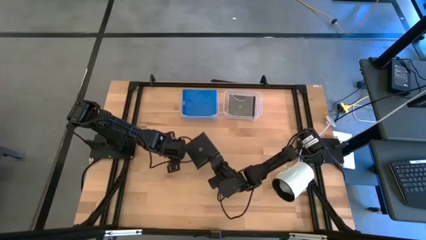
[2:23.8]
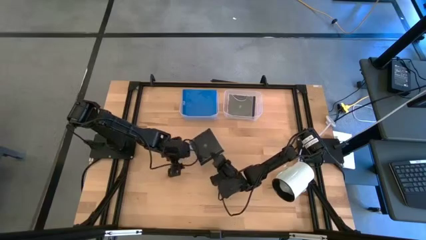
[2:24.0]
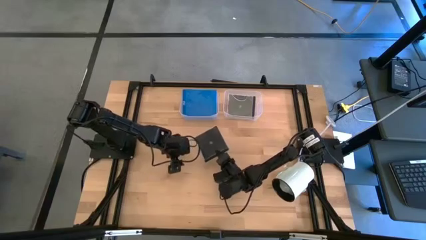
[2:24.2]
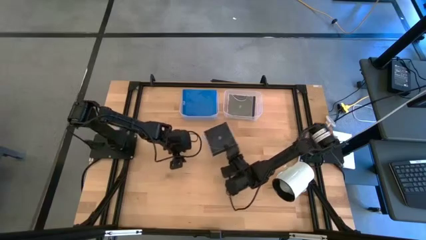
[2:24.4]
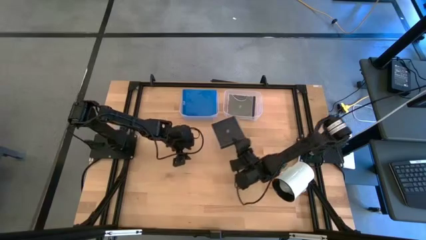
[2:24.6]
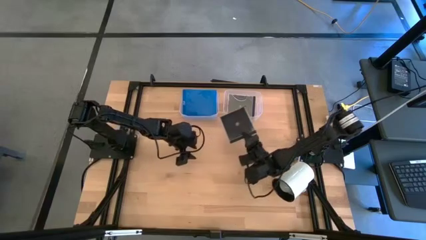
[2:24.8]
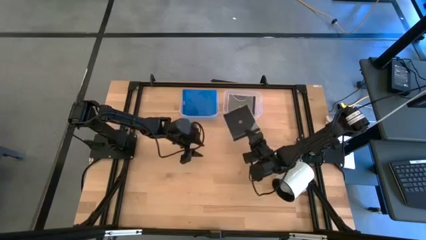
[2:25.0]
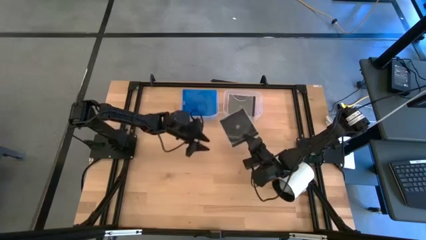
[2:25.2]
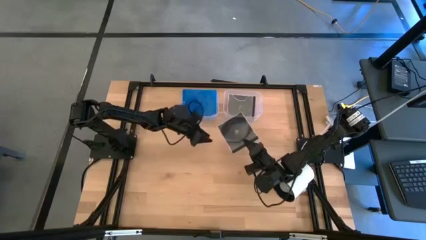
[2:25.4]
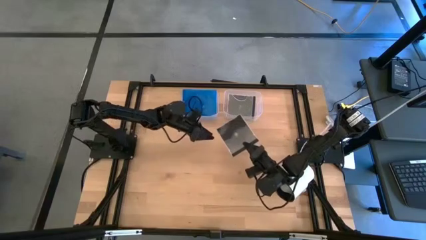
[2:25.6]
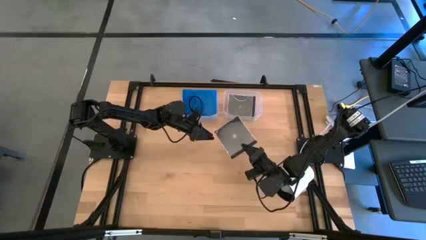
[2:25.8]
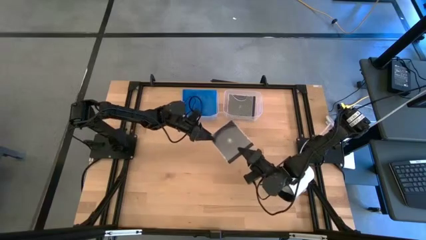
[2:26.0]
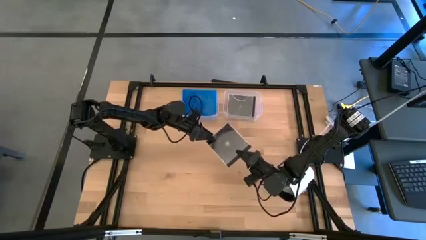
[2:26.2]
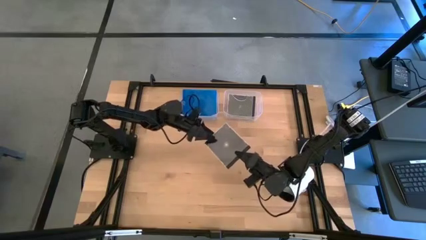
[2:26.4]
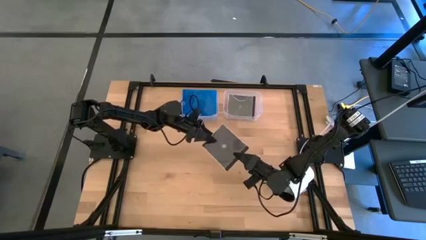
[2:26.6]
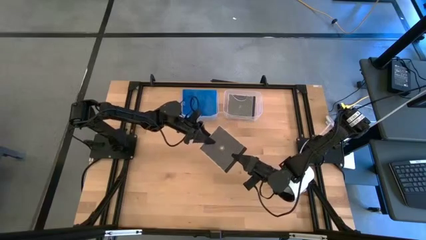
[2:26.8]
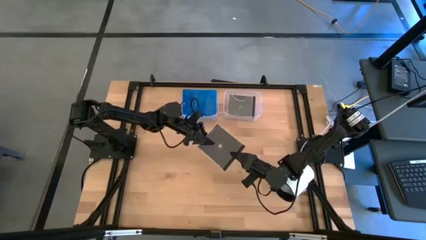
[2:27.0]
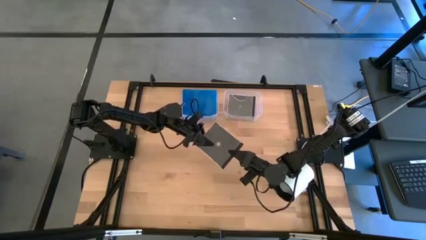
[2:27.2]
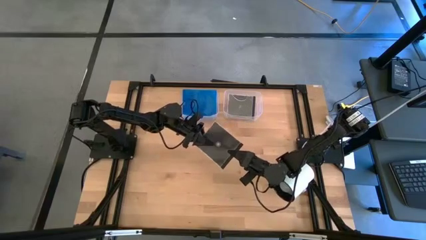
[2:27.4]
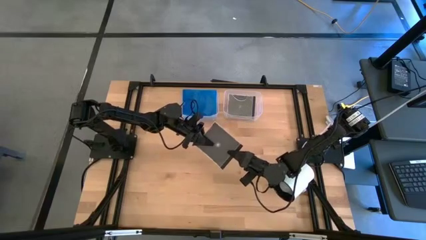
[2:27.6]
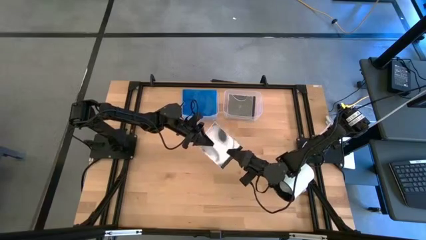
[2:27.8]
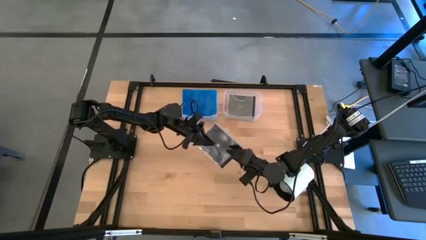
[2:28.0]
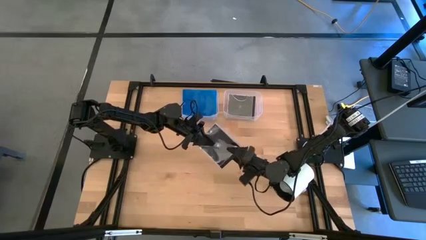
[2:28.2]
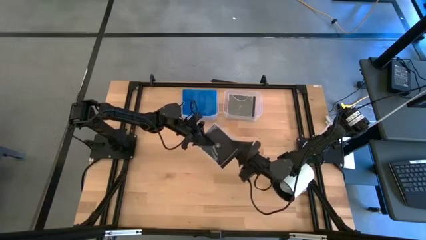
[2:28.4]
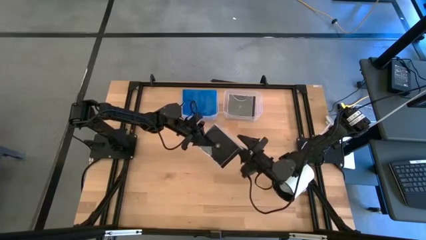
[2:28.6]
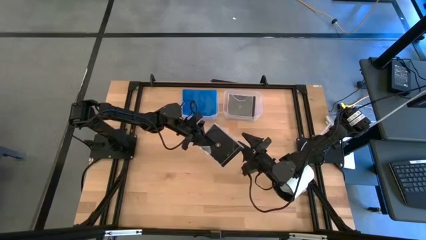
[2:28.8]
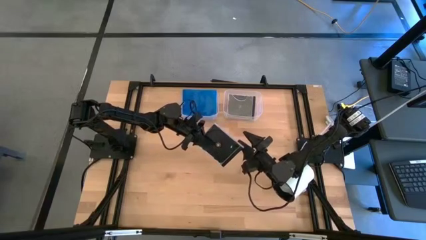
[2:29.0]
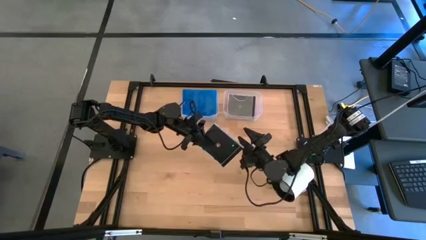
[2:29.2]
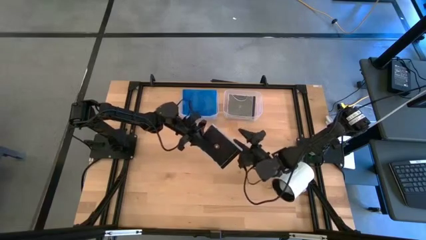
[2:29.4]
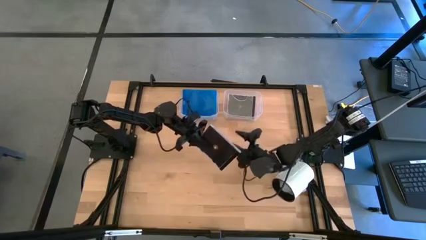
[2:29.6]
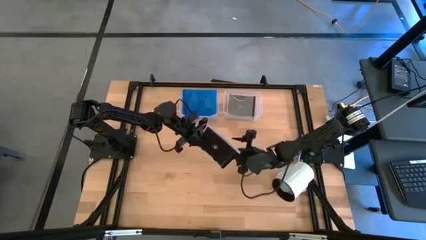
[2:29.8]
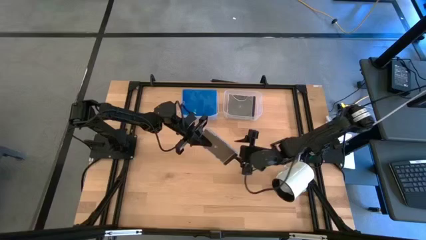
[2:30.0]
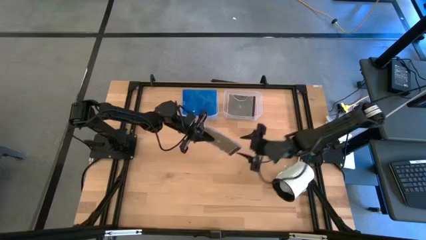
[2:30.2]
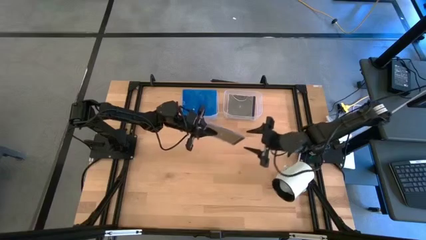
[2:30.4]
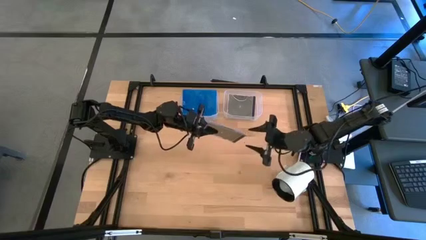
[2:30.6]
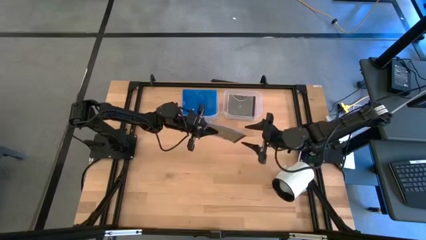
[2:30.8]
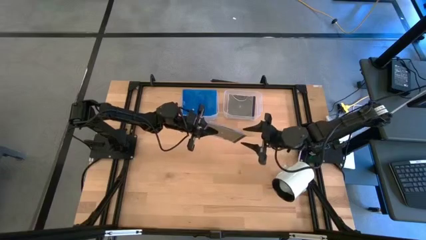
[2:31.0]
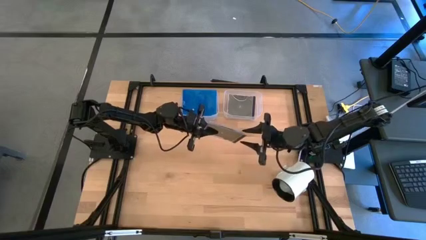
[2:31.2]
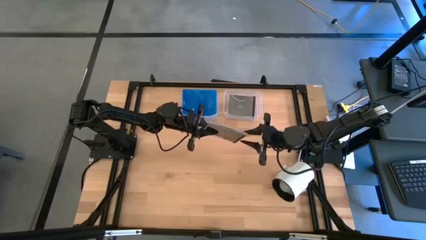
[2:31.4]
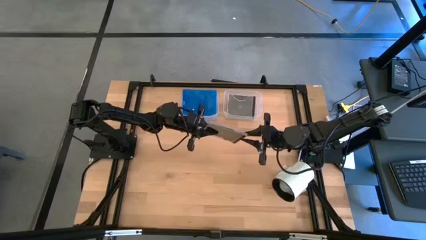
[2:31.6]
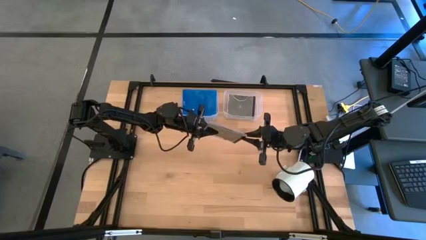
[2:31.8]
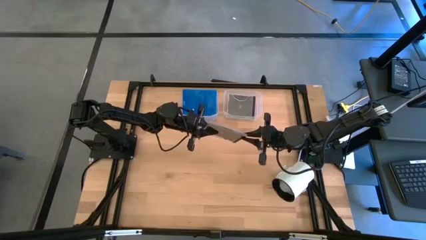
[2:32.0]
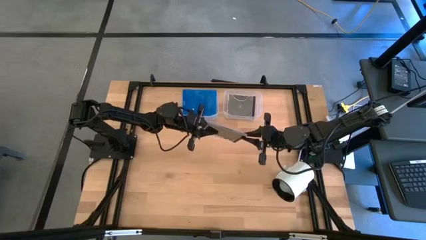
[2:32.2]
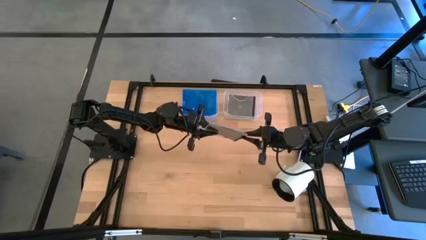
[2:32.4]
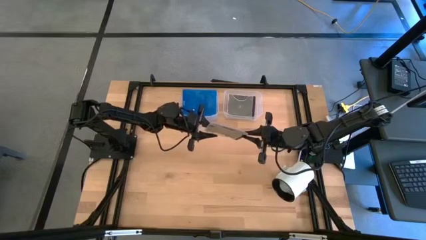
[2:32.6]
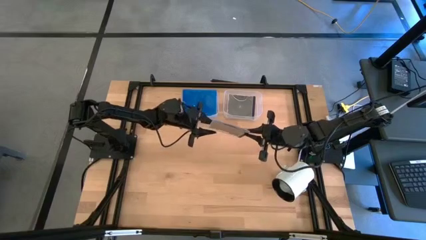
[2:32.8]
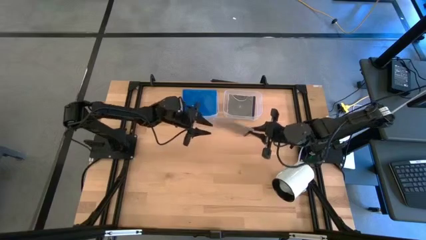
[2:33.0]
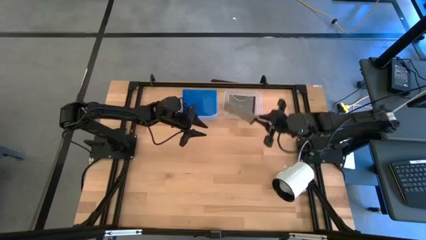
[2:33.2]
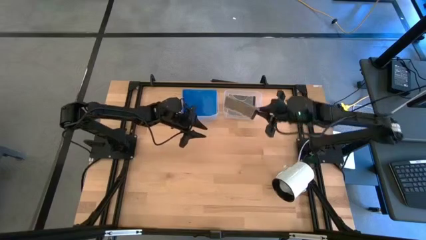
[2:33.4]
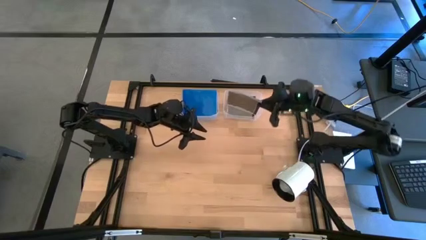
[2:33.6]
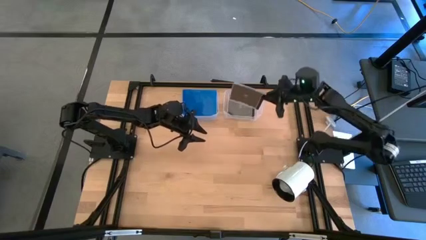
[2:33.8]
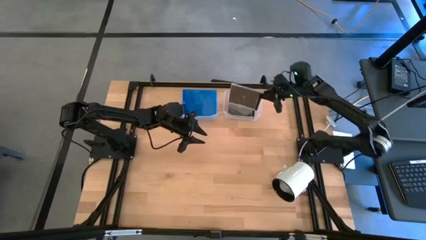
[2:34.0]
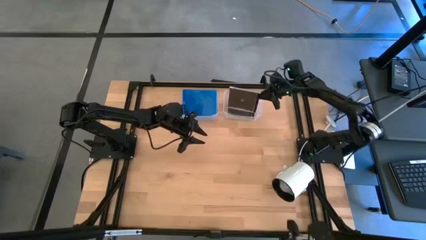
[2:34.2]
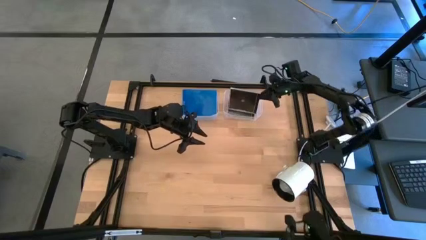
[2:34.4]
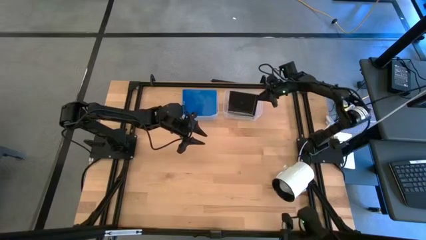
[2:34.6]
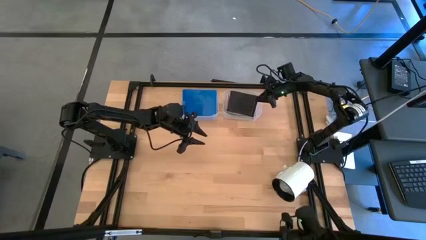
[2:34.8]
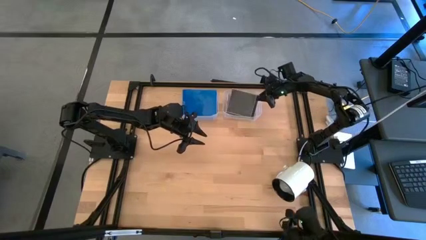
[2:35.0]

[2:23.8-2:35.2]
Task: Pick & place jewel cases by type
Put the black CD case into the transparent bin

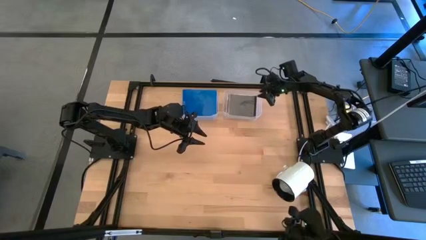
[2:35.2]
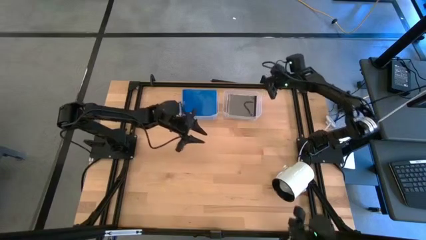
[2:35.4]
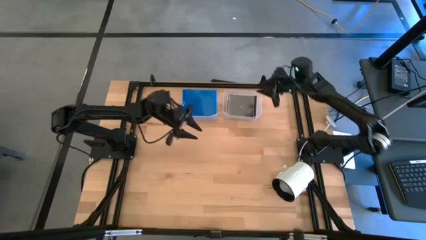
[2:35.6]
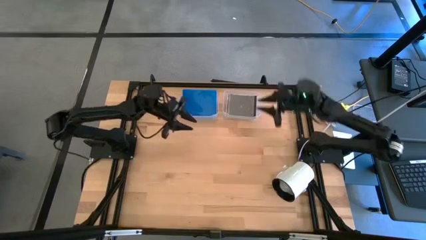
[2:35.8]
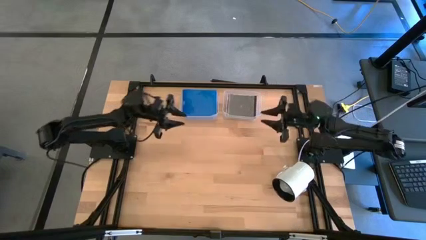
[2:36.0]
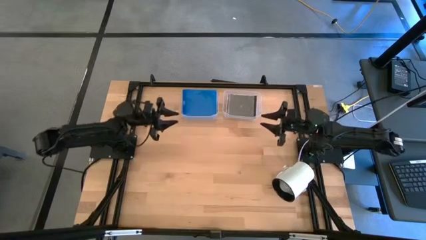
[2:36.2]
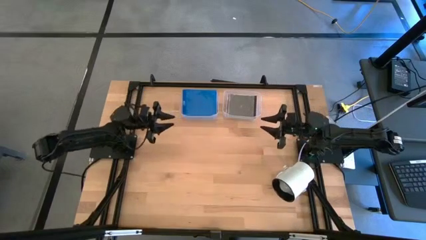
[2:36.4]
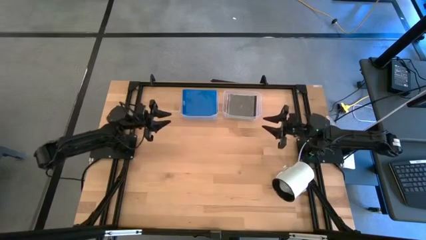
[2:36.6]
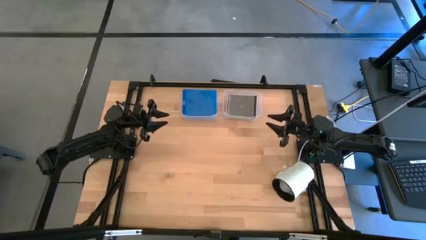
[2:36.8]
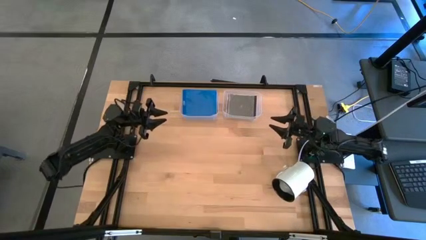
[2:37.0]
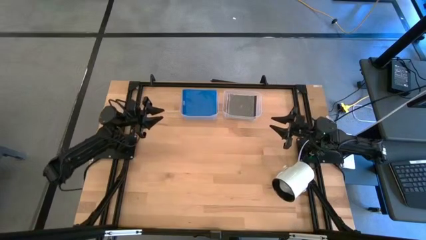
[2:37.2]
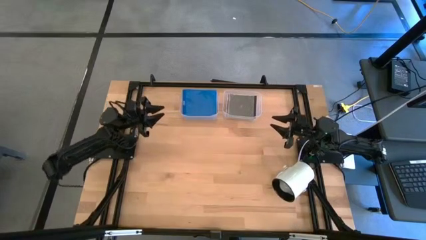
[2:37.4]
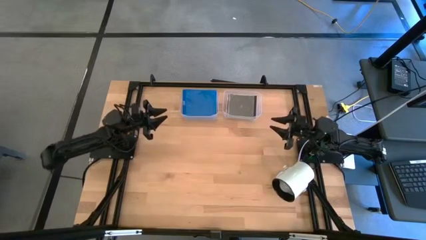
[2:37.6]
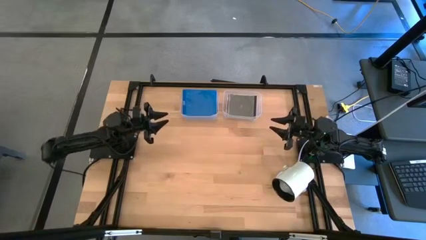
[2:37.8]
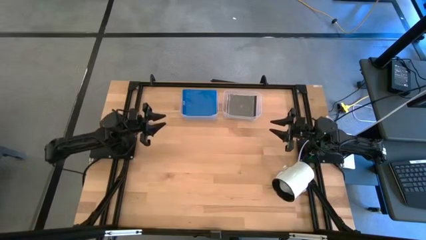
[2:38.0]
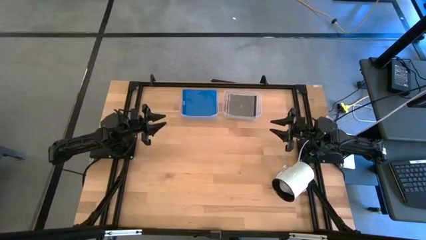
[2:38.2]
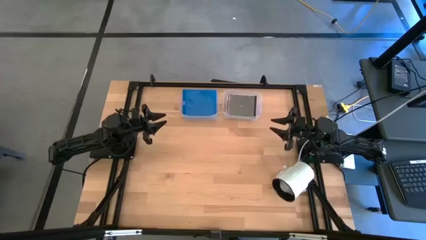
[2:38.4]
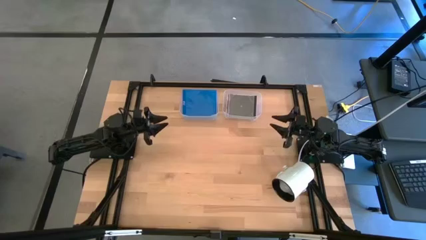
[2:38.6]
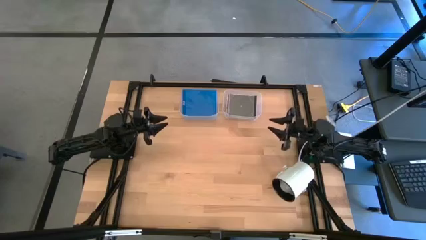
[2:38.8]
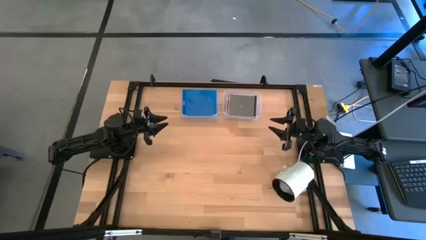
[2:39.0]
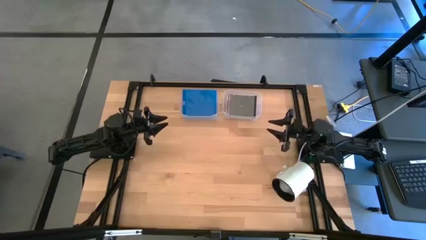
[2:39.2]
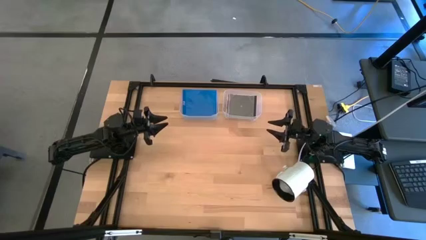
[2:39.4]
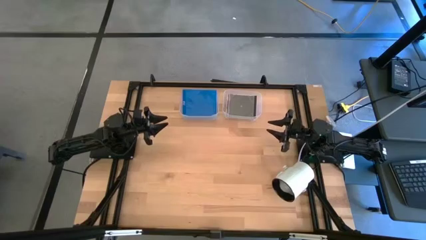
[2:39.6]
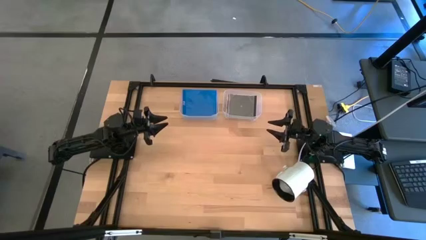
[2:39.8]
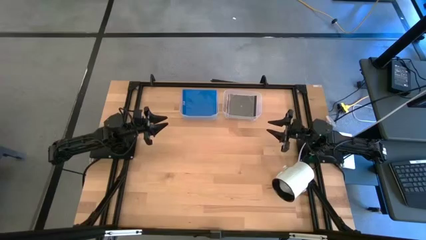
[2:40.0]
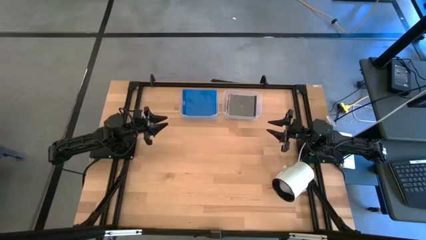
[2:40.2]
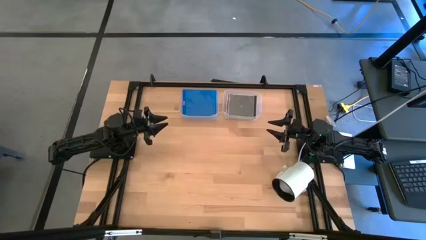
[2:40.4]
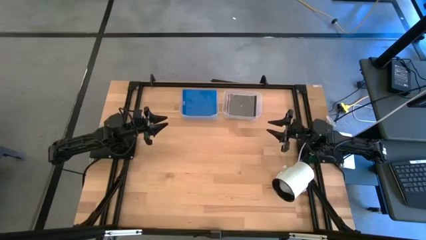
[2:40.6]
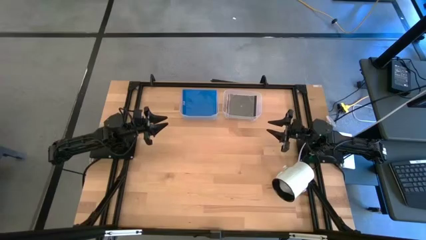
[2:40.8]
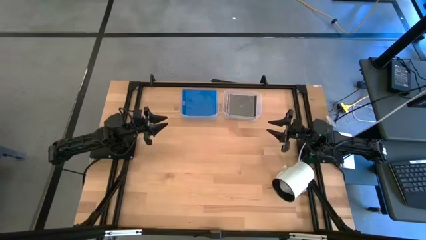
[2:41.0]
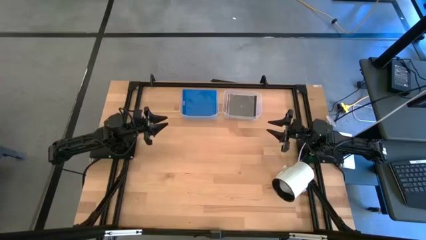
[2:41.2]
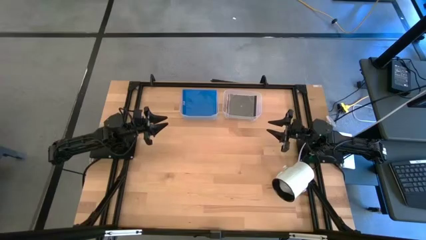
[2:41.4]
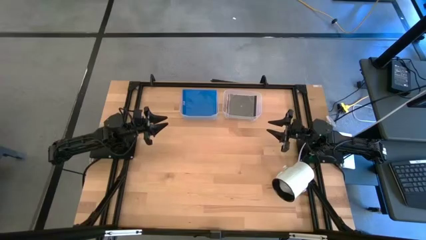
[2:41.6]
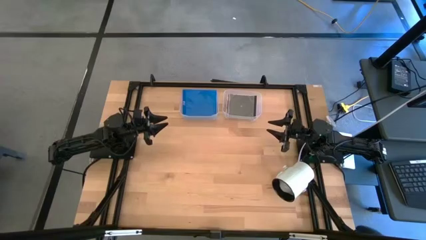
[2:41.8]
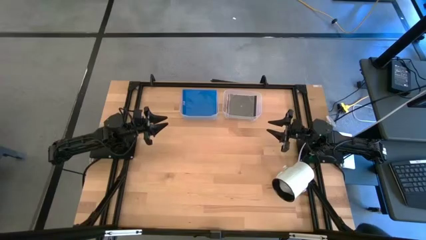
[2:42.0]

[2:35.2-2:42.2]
Return to Home Position
